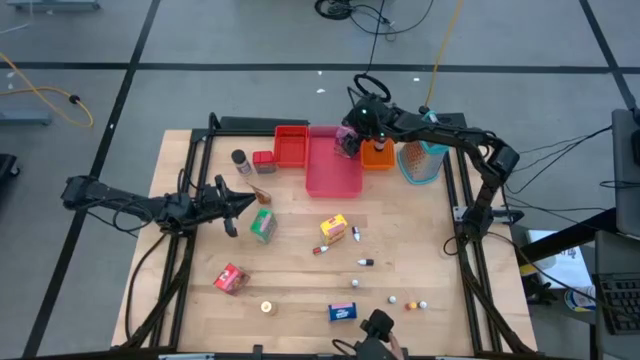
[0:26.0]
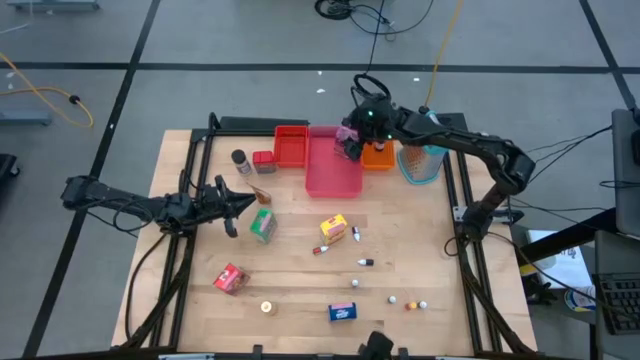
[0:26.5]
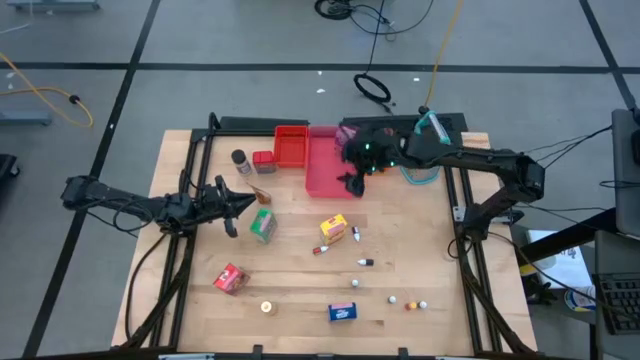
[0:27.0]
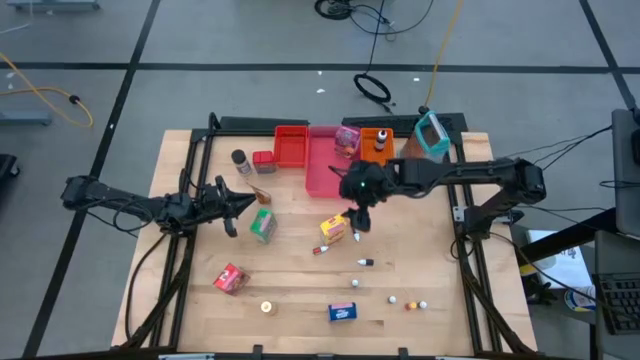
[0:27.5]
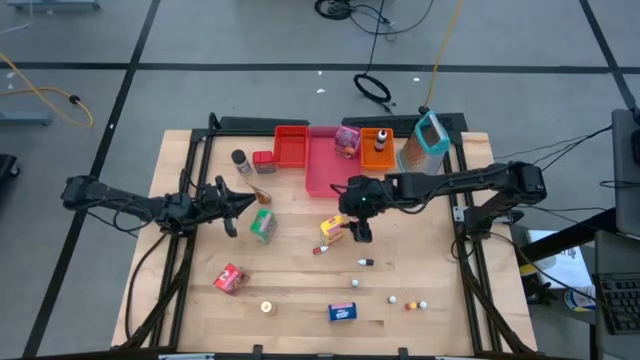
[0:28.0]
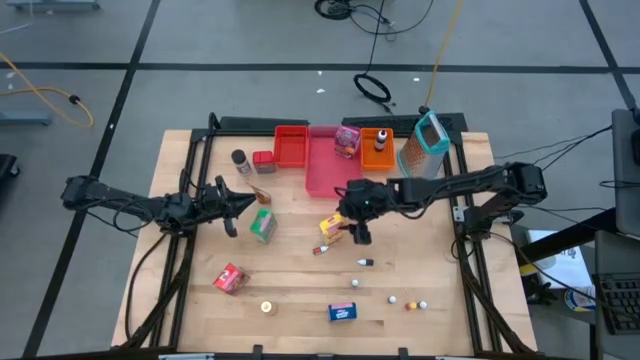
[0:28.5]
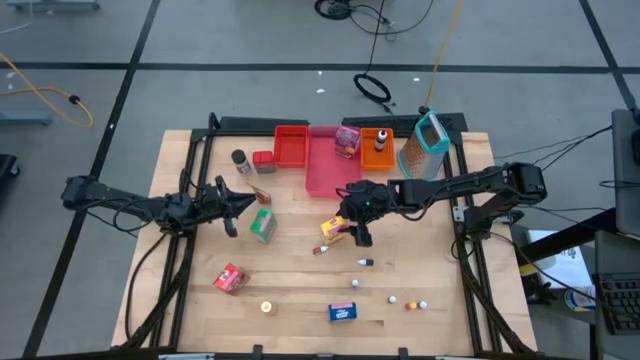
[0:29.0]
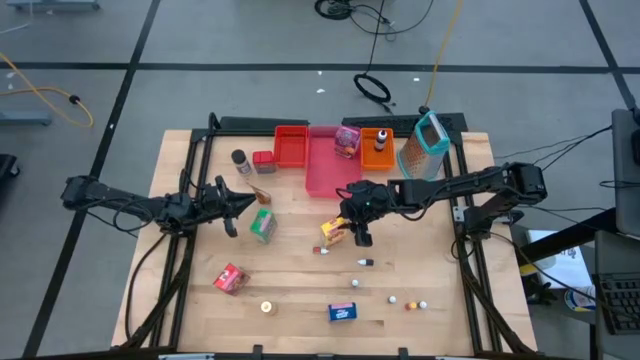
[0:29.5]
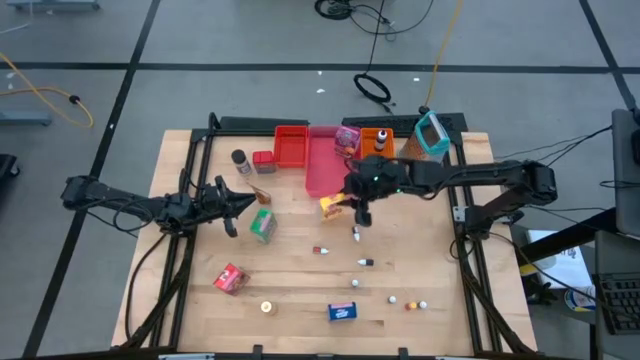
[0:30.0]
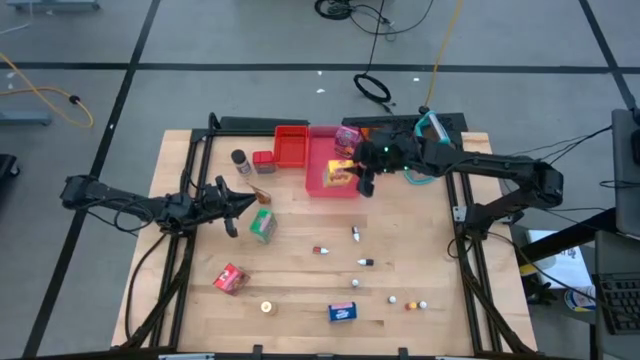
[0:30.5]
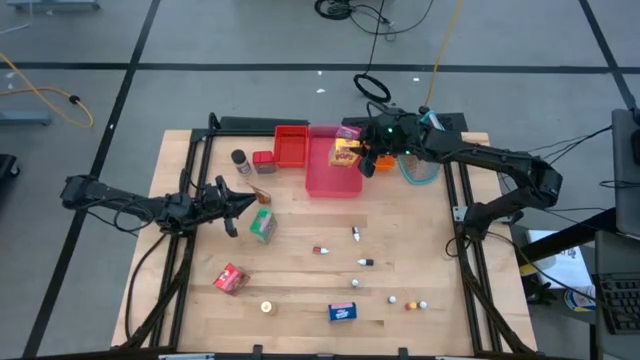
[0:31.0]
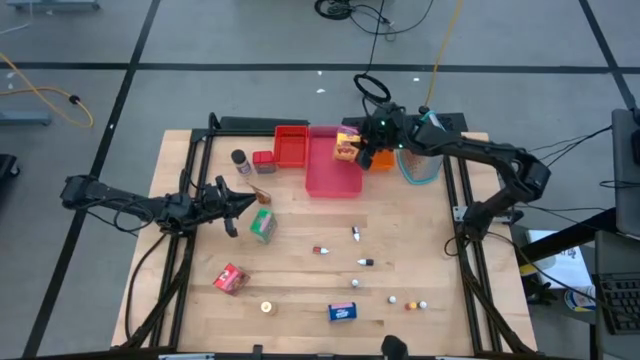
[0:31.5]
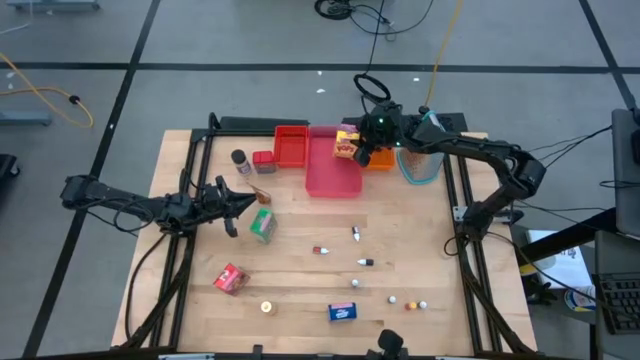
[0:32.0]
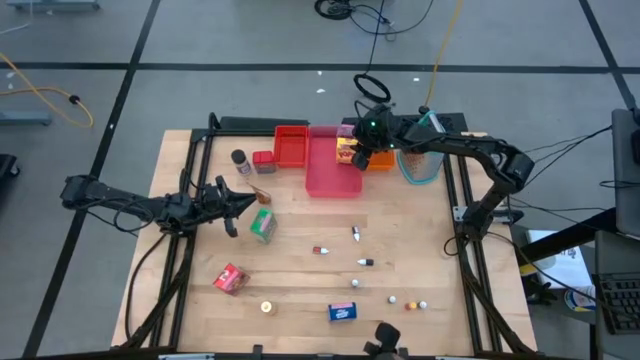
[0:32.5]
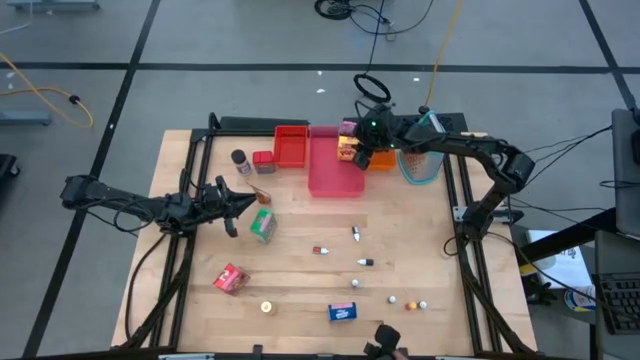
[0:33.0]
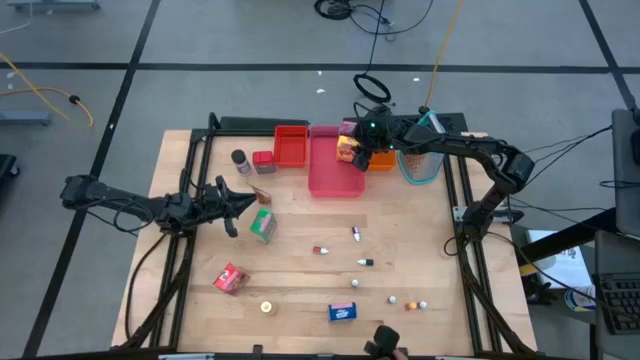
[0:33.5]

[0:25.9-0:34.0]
Task: Pick & Place Kitchen Items
Put the yellow cereal box into the pink bin

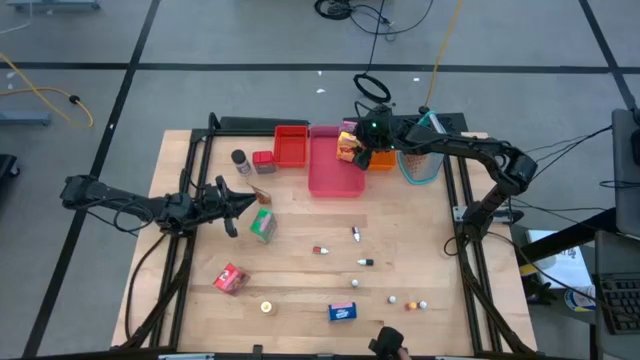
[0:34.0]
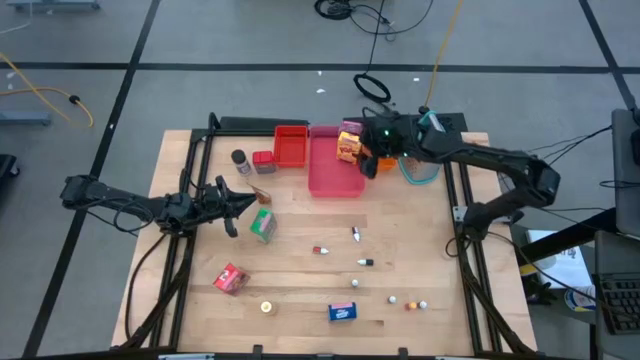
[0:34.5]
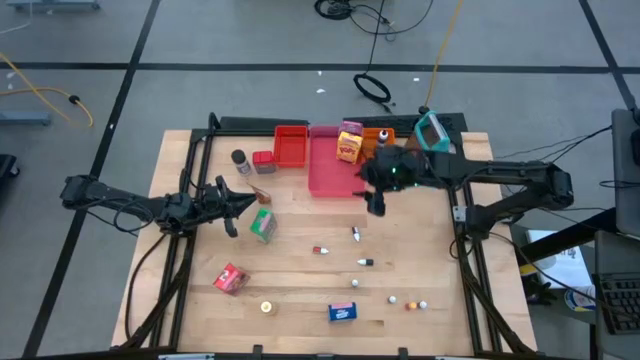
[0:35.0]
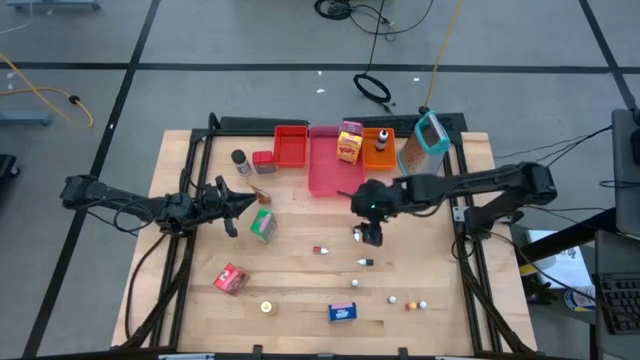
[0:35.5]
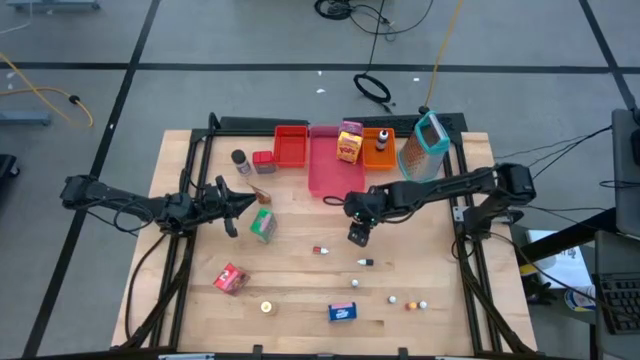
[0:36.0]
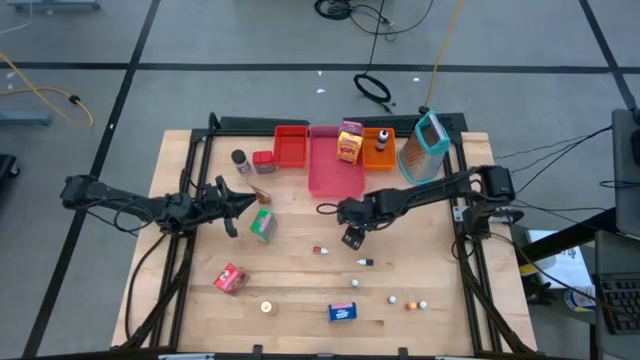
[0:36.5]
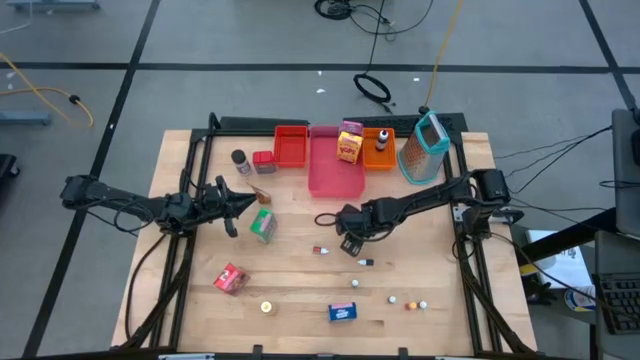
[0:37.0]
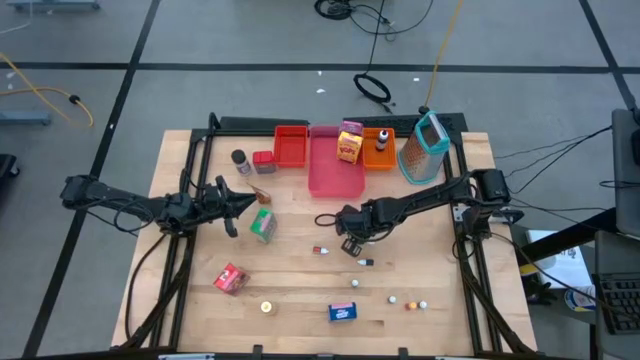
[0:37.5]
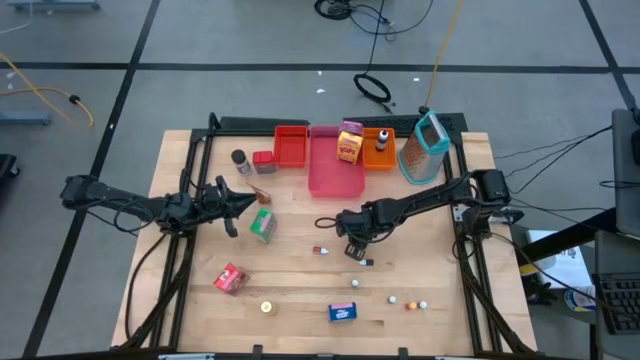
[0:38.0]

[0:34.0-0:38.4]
Put the red food coloring bottle into the orange bin

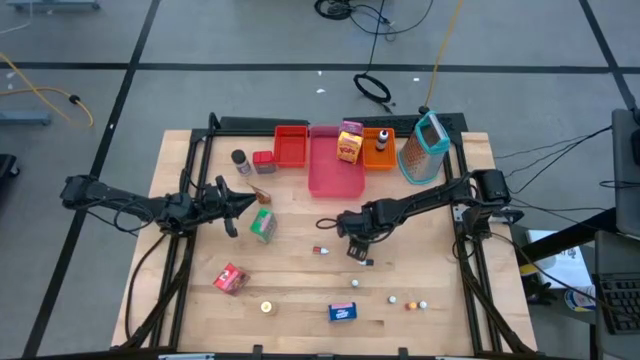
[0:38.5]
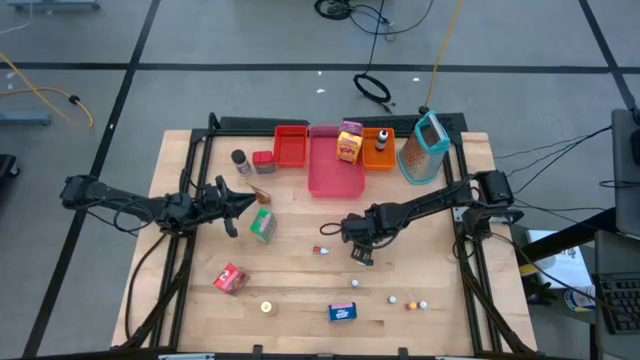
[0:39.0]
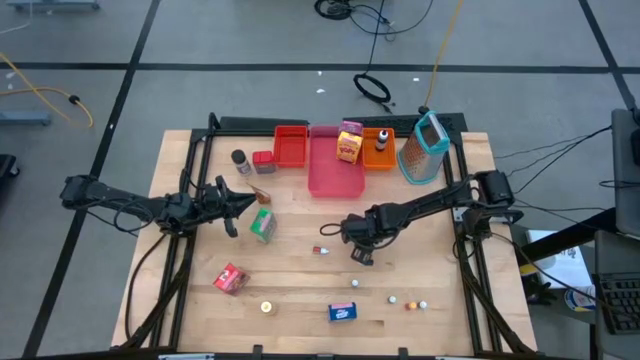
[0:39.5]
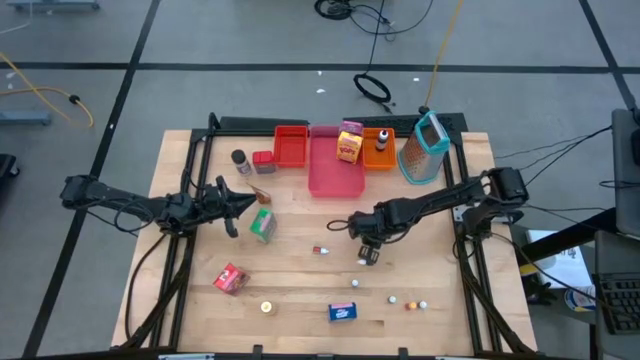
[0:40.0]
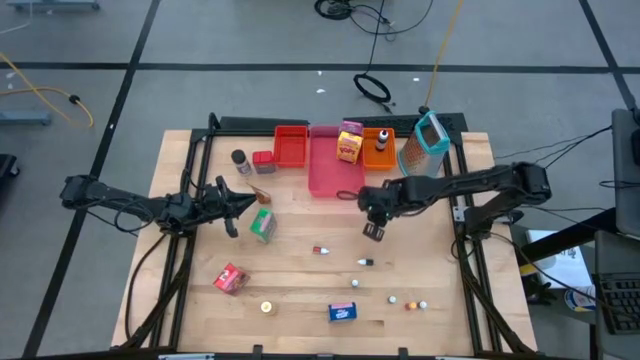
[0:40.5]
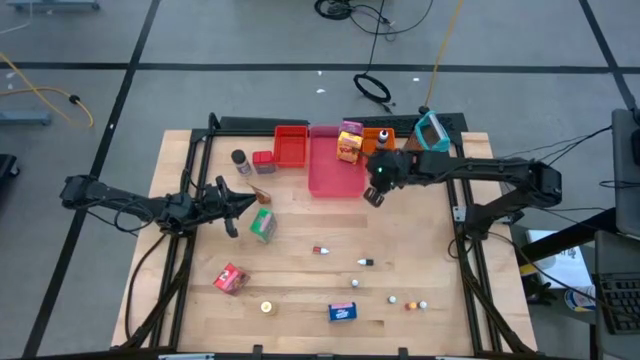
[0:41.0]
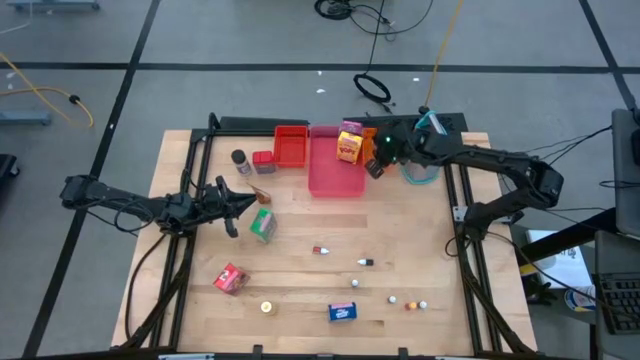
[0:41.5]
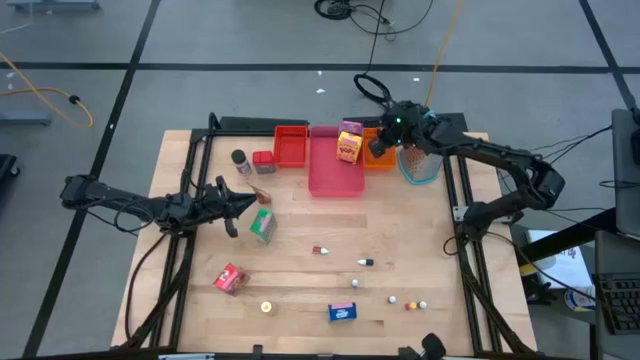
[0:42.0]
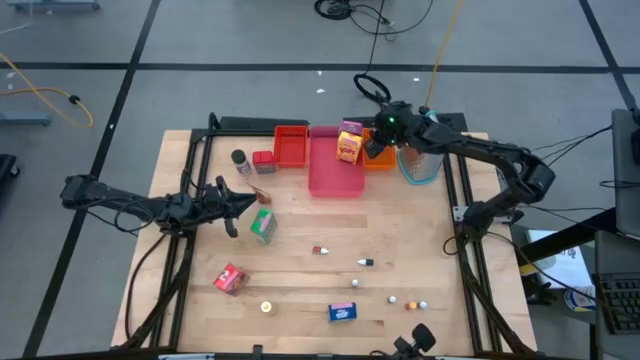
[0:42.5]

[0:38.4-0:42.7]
Put the red food coloring bottle into the orange bin

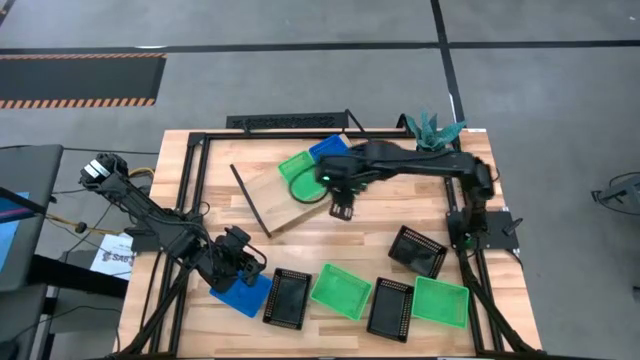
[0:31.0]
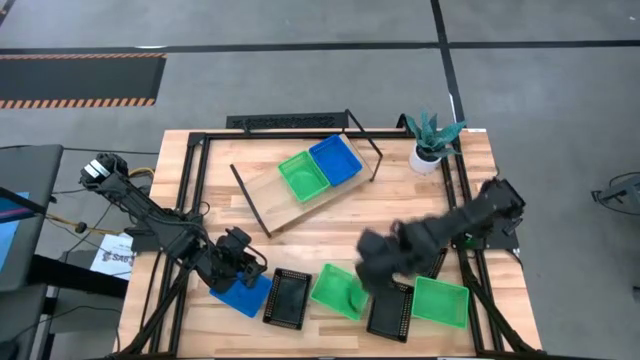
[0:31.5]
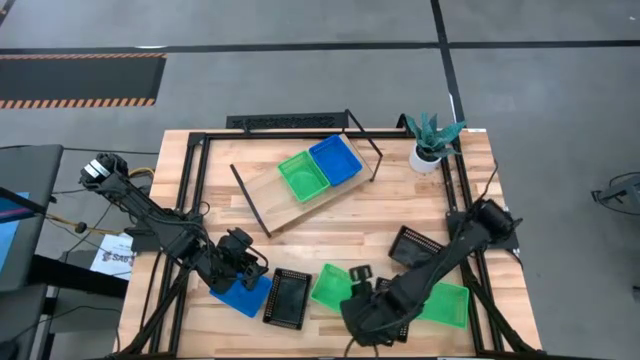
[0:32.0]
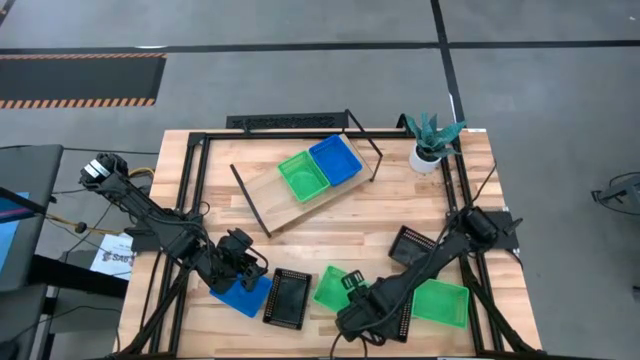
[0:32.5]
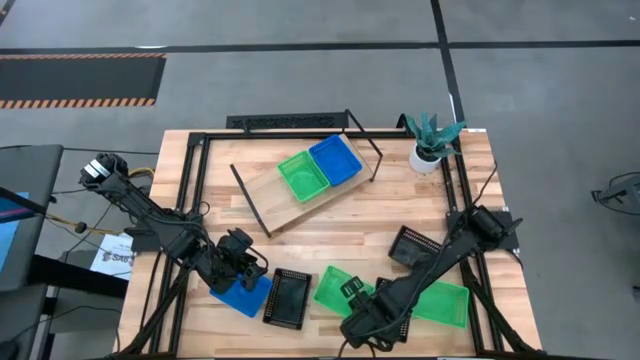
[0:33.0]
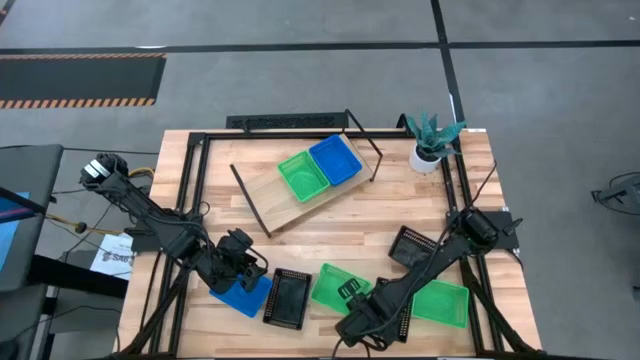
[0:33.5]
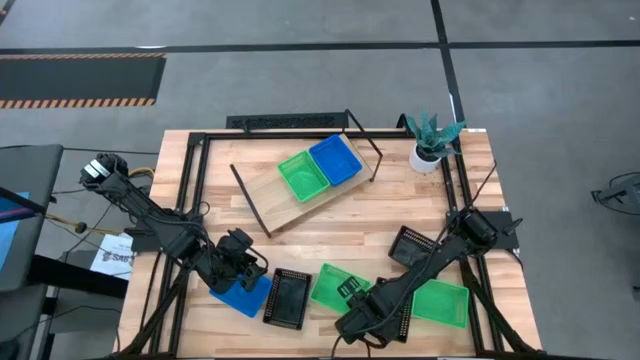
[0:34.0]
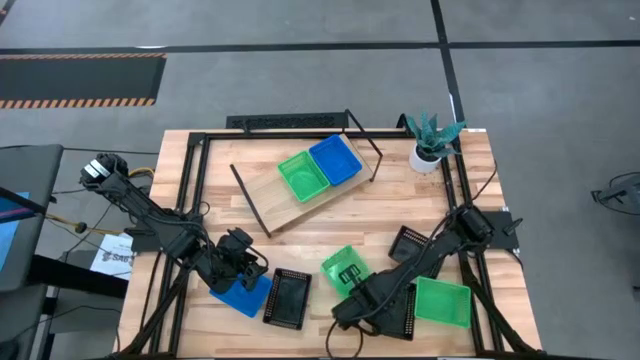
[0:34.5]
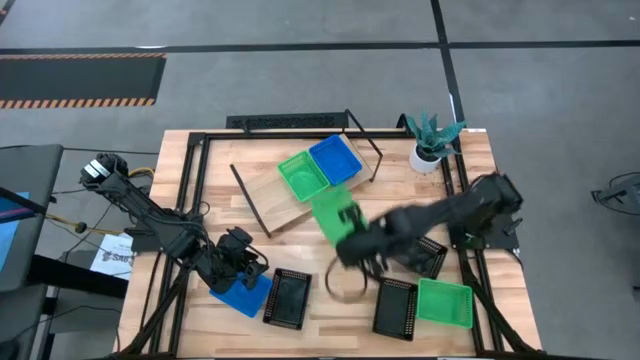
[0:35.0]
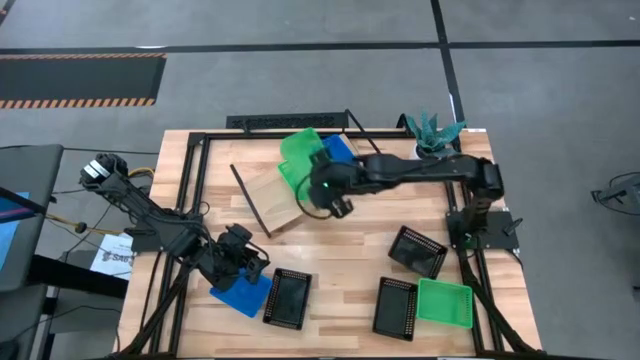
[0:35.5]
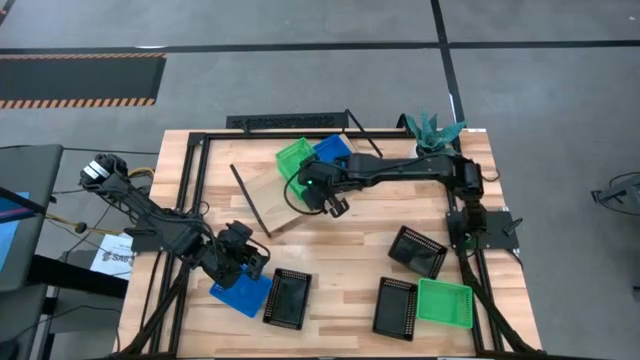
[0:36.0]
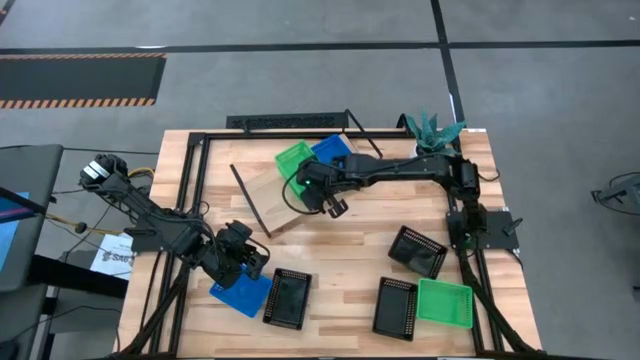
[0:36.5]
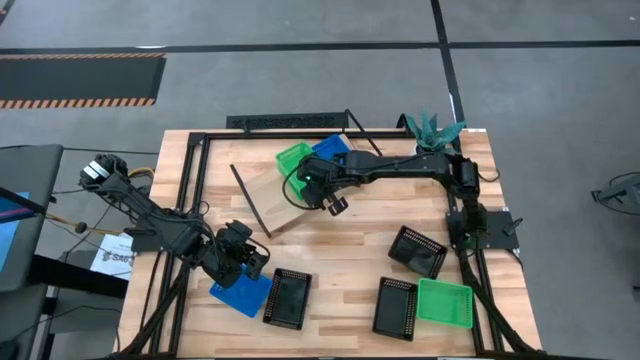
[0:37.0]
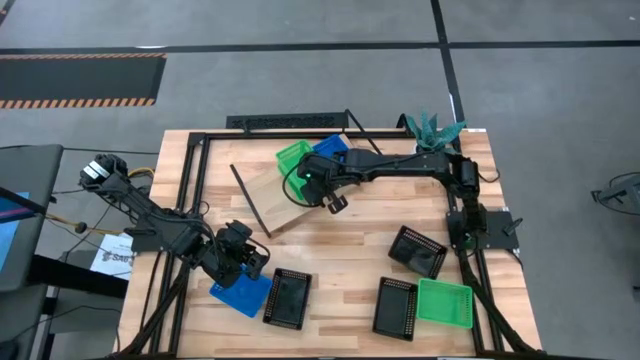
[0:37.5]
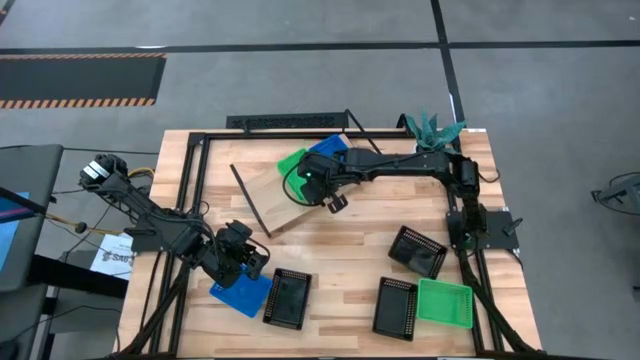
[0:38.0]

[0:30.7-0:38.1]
Task: Stack baskets on shelf by color
Stack the left green bin on top of the other green bin on the shelf
